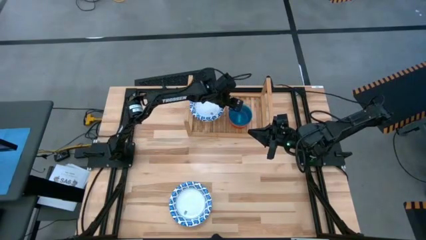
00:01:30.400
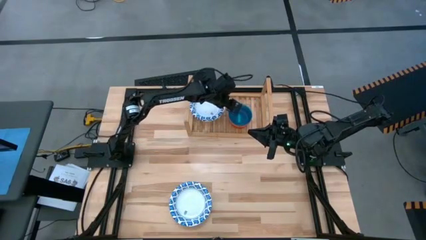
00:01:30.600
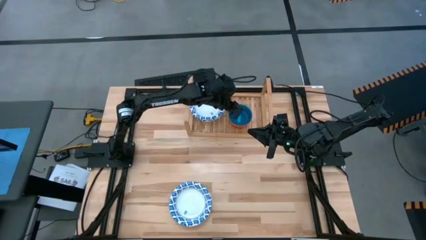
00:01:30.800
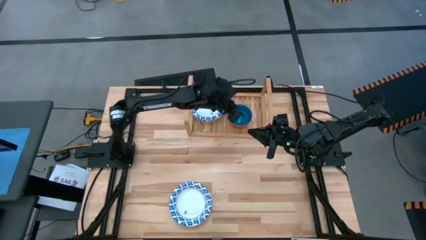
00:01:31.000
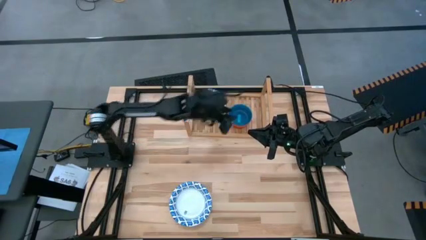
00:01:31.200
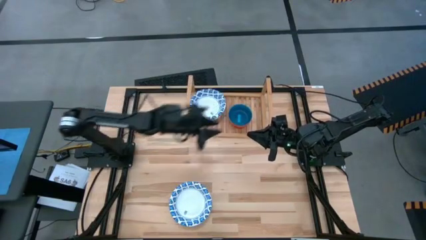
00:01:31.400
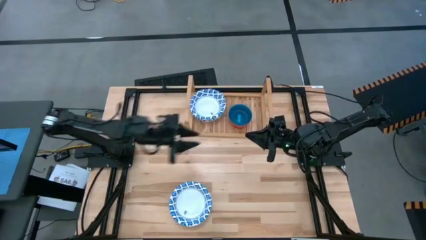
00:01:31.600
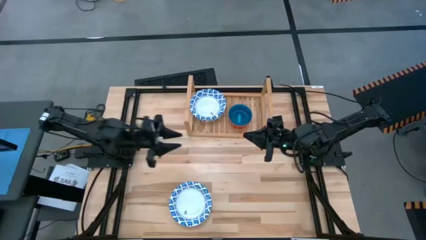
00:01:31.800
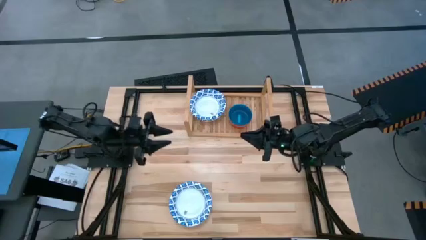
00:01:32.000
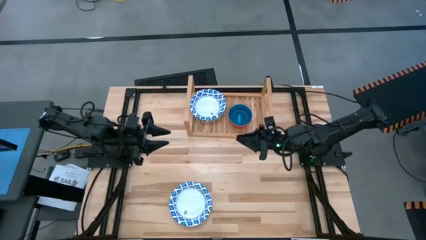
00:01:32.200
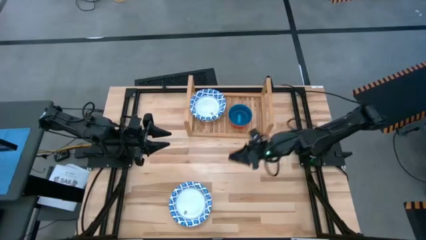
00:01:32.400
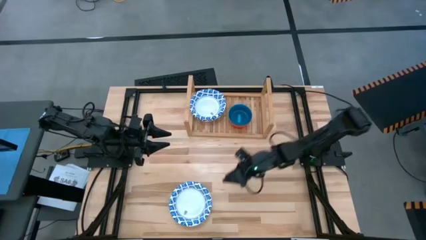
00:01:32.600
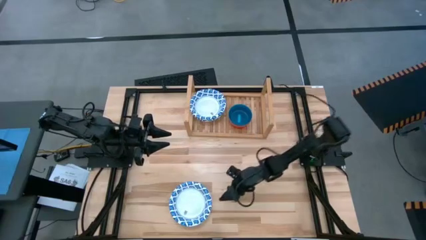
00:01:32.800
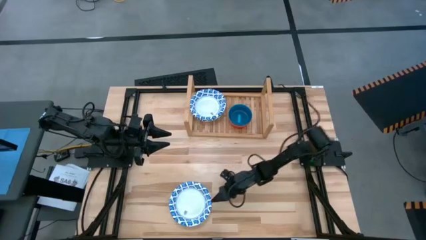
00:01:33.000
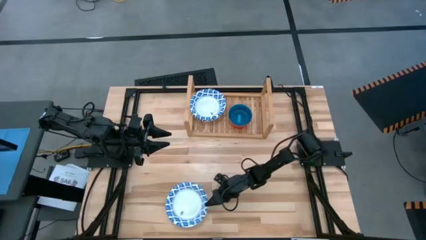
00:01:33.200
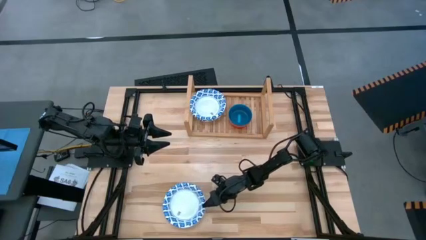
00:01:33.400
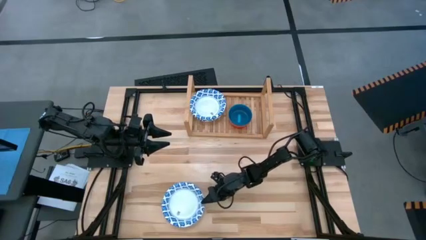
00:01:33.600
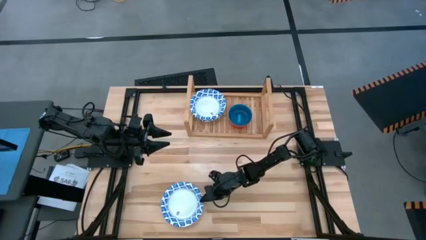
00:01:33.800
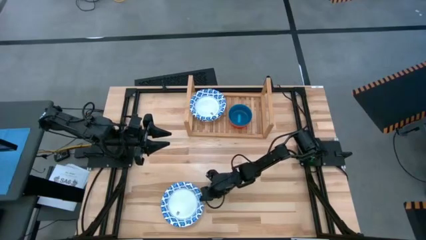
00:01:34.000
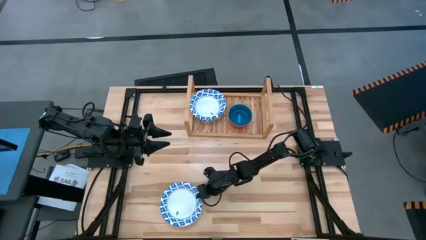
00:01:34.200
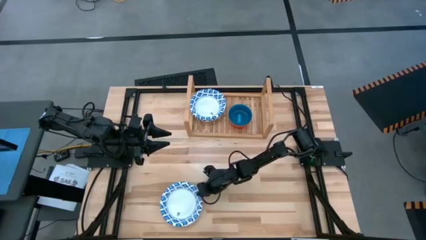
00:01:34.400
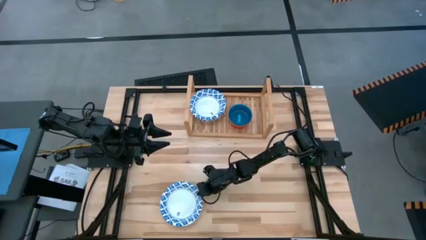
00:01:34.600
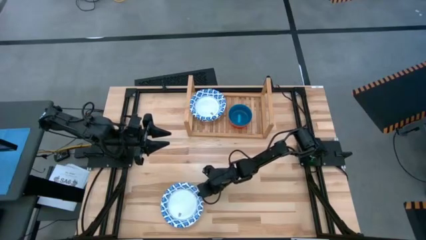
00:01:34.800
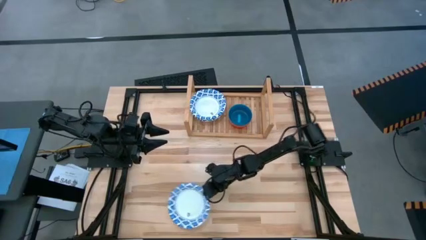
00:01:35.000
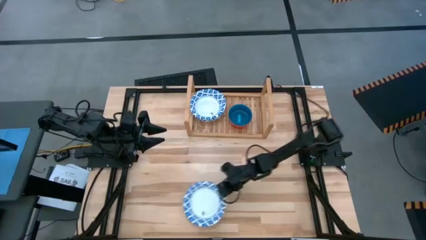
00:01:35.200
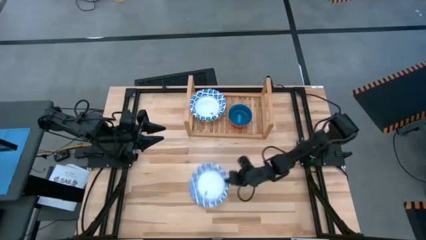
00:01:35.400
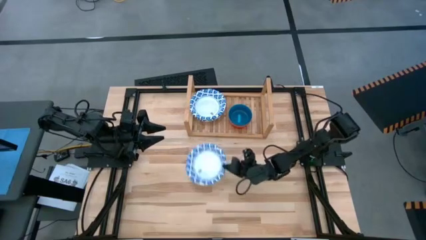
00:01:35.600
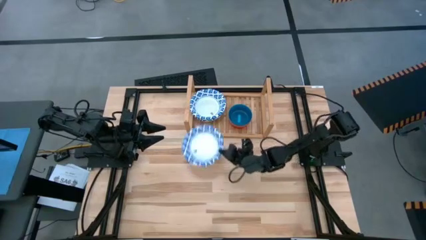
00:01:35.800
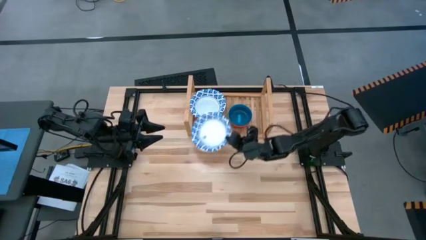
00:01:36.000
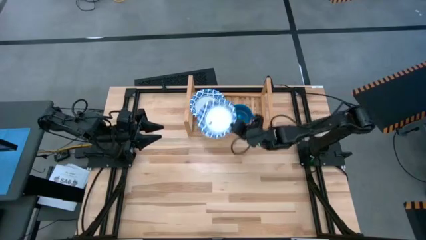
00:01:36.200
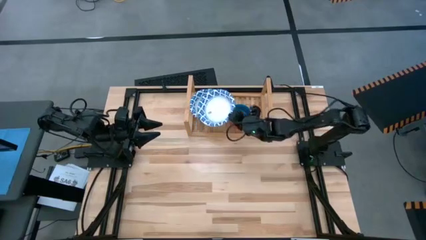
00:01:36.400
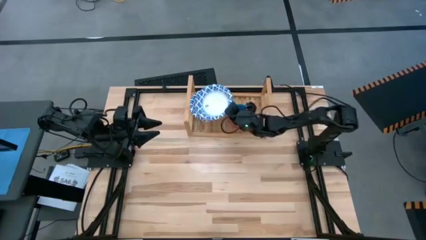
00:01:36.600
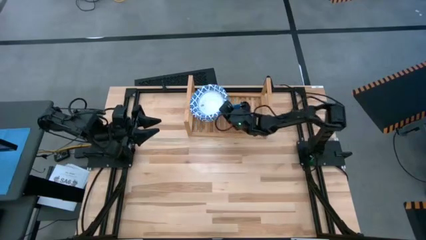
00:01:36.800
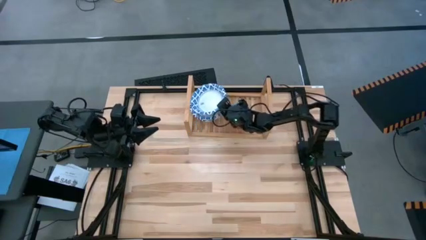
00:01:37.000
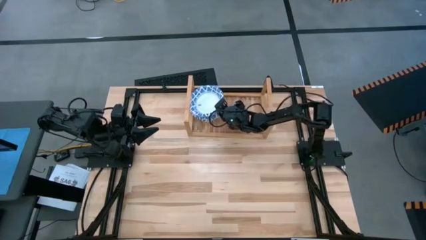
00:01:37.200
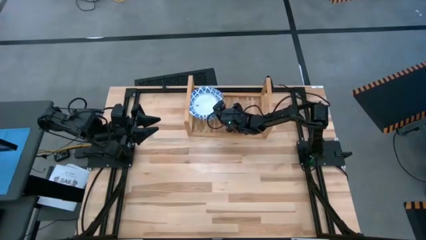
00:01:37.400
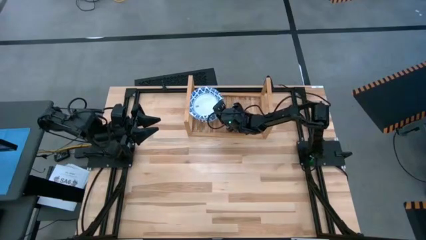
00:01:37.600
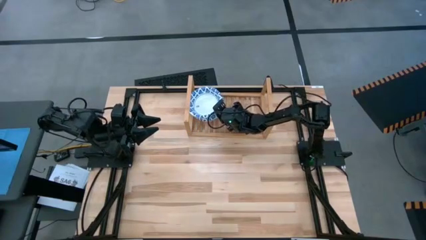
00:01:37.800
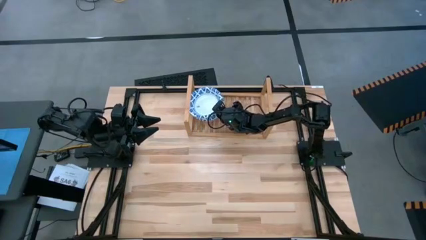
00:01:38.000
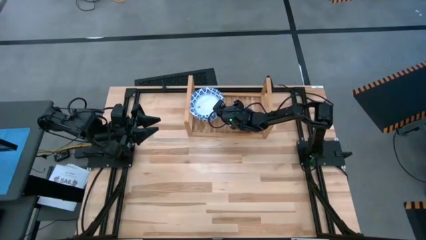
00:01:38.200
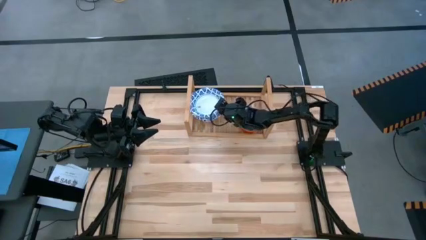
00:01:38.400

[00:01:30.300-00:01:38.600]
Task: Place and stack bowls onto a shelf
Stack the blue pattern bowl on top of the blue pattern bowl on the shelf

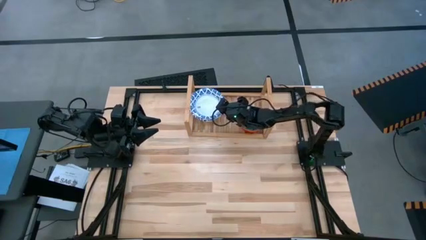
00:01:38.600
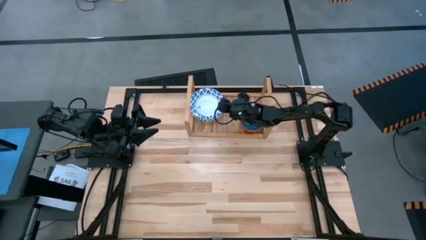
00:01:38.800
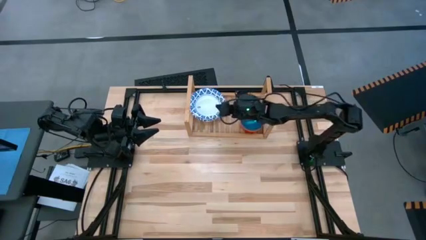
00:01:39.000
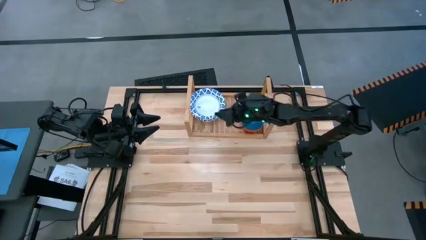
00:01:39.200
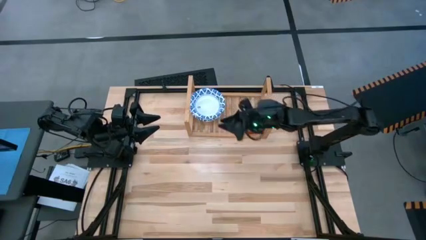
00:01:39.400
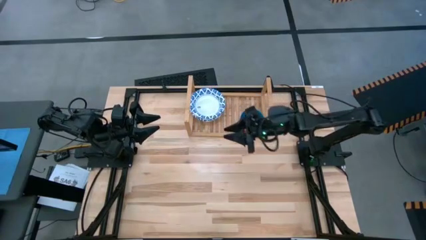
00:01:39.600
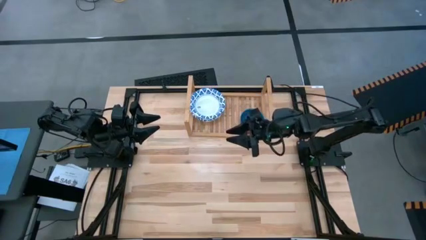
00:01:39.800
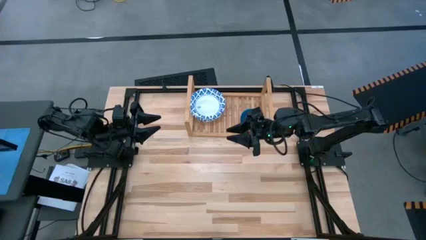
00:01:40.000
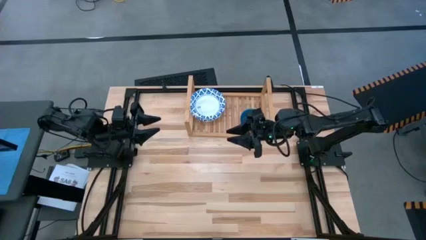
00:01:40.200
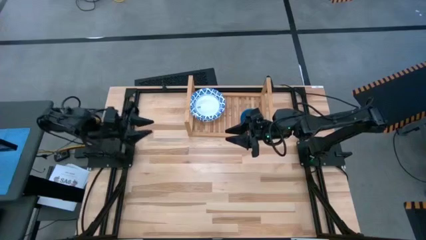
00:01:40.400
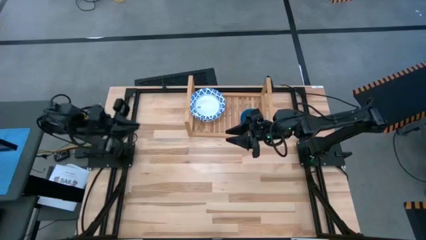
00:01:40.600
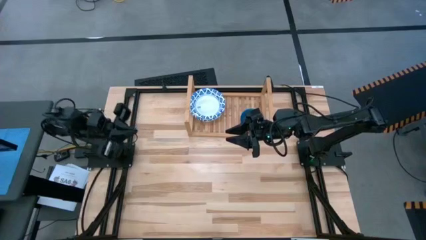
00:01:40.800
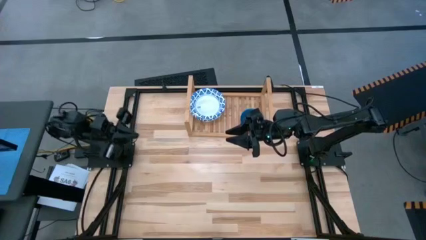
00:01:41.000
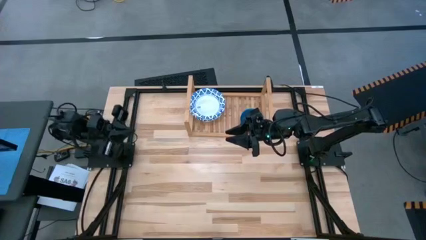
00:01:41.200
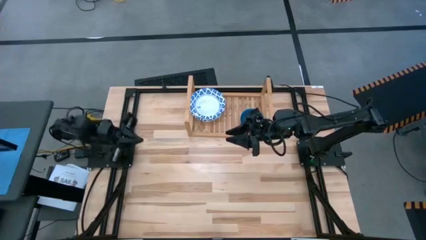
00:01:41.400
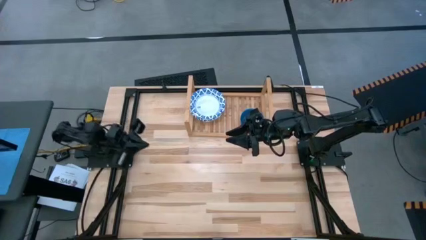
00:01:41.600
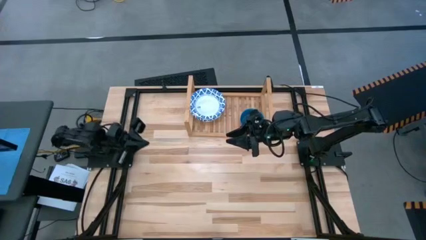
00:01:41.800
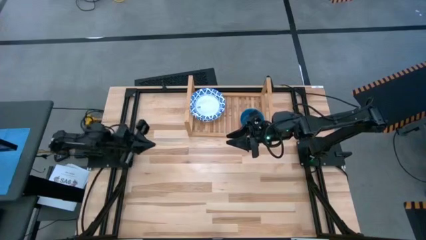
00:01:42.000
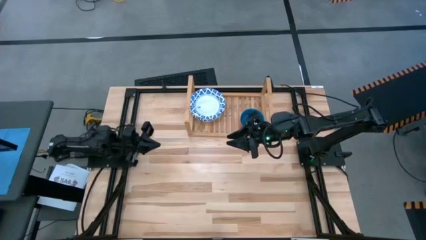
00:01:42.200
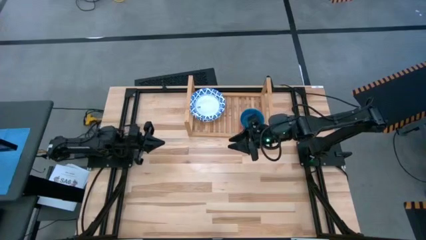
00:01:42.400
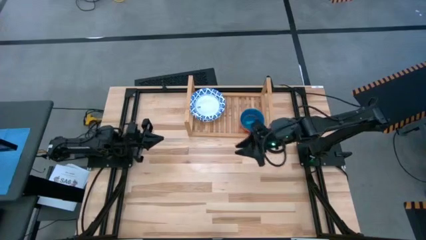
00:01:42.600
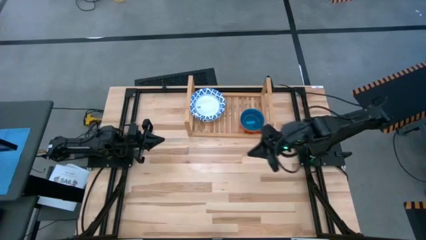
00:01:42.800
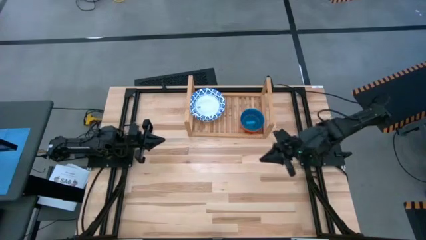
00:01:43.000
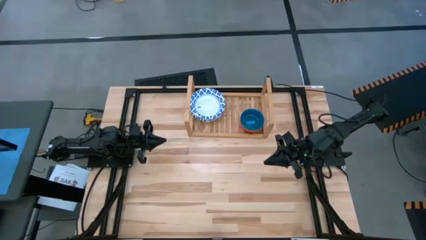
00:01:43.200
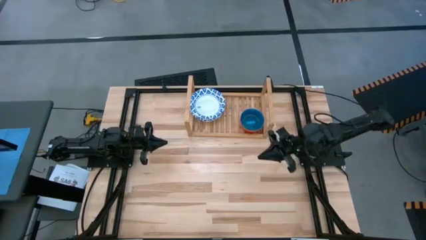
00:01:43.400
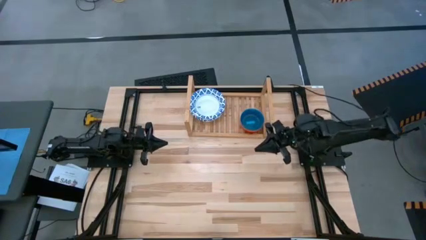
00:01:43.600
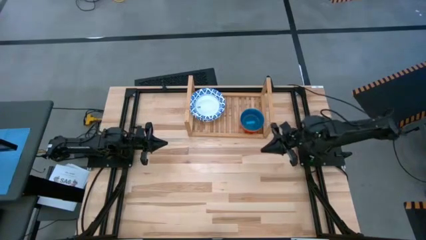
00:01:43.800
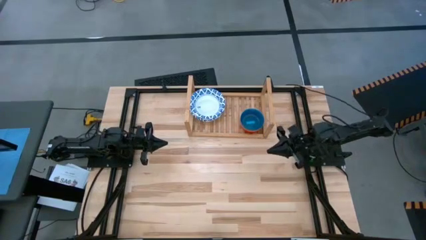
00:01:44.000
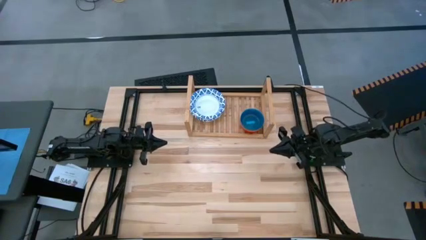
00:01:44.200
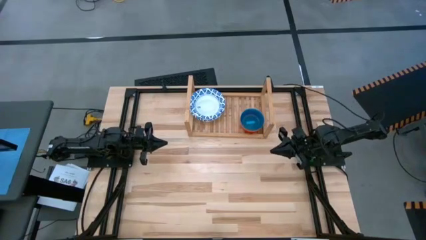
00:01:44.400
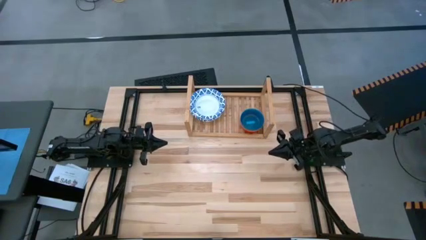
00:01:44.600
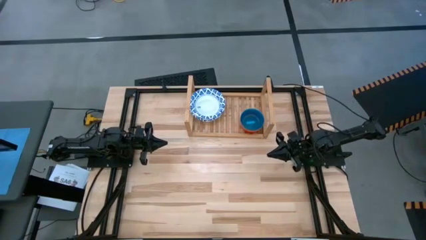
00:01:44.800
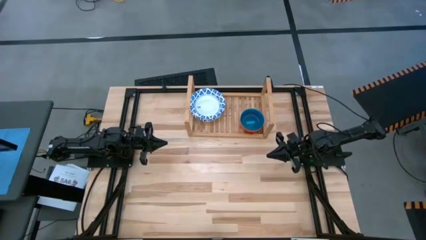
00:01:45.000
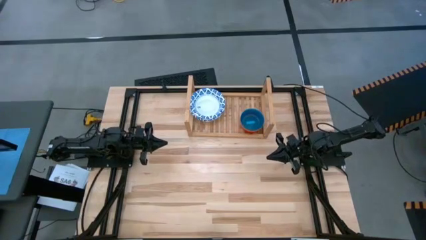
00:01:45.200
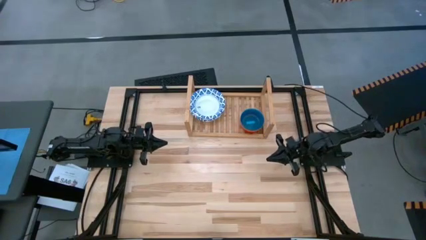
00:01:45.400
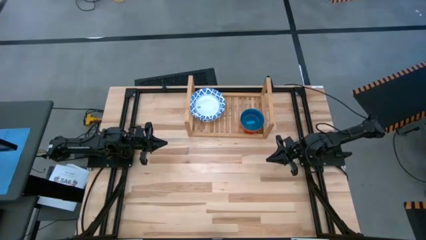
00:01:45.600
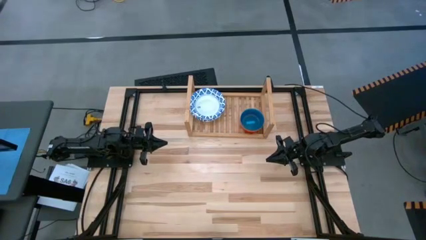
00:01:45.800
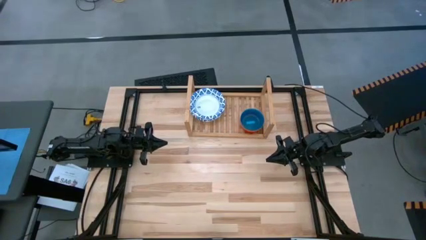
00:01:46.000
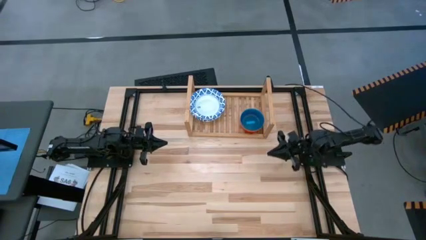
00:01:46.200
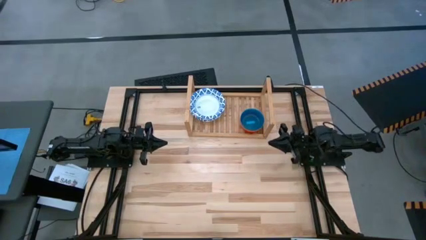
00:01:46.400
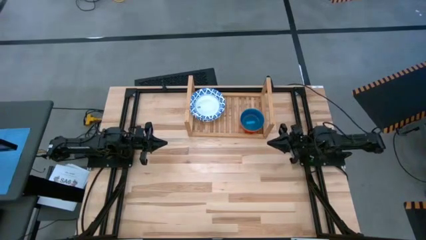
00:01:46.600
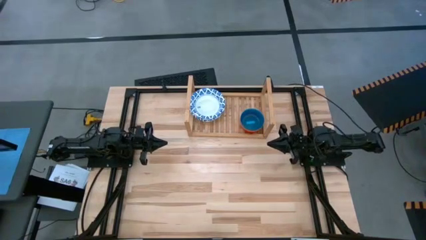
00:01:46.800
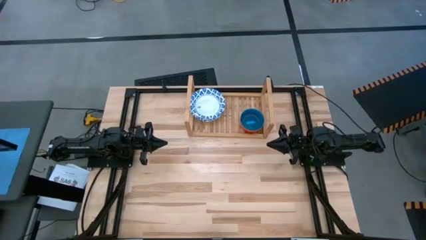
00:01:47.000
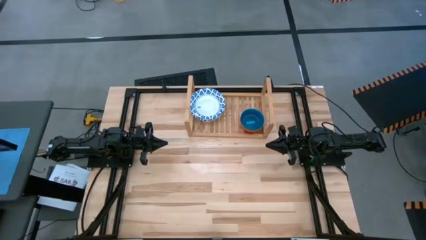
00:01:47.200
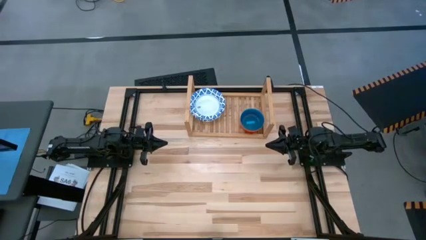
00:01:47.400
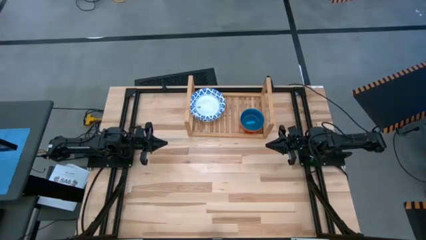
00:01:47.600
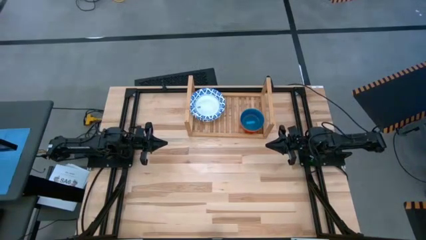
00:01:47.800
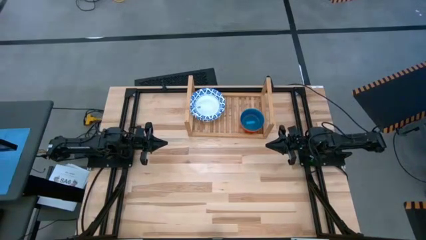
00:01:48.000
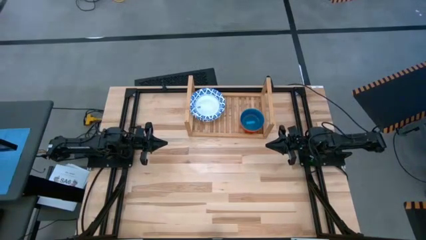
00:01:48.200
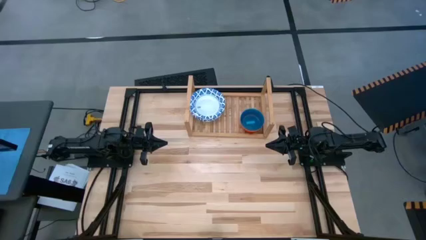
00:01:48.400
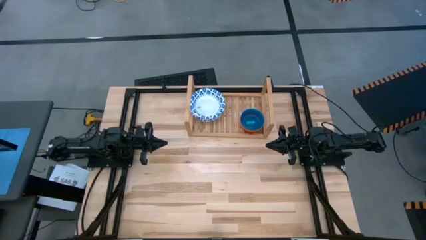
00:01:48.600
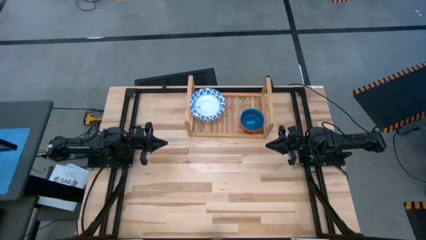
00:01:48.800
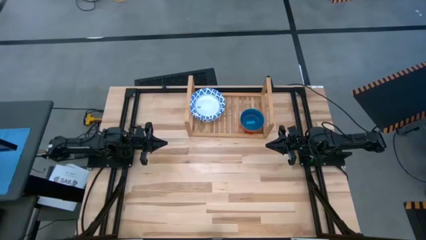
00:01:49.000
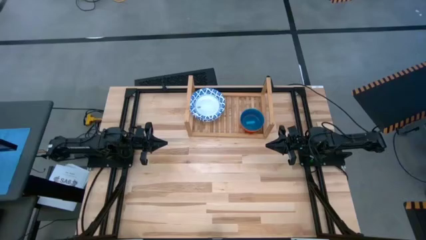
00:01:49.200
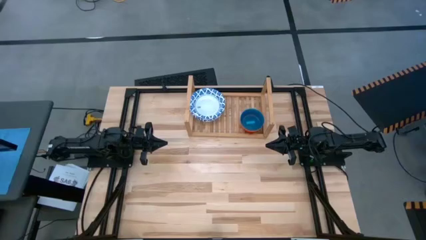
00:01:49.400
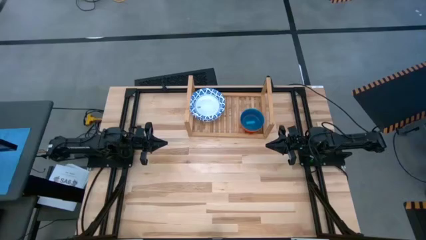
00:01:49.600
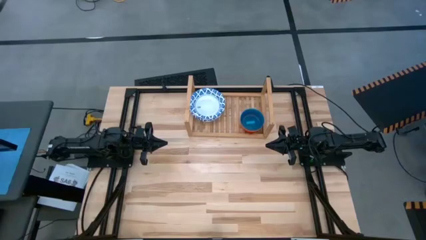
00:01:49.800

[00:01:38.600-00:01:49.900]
Return to Home Position
